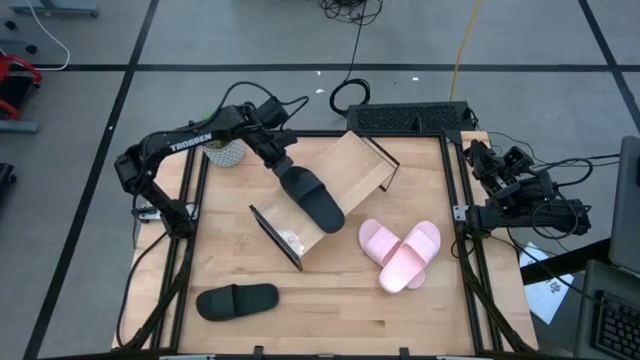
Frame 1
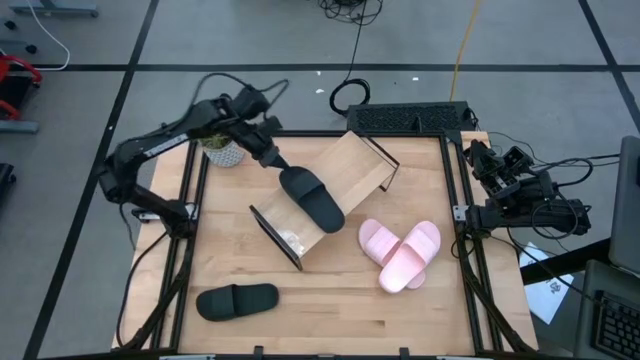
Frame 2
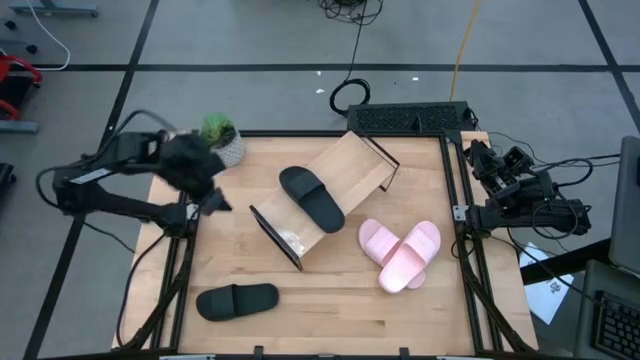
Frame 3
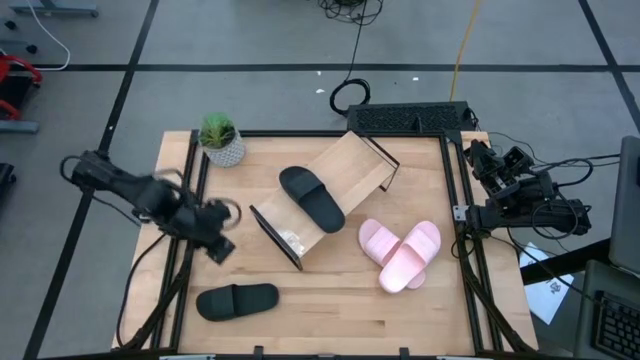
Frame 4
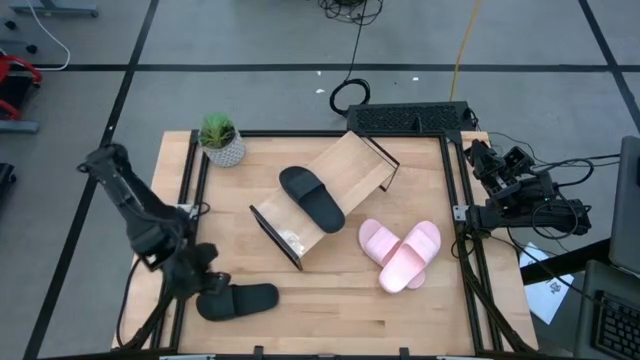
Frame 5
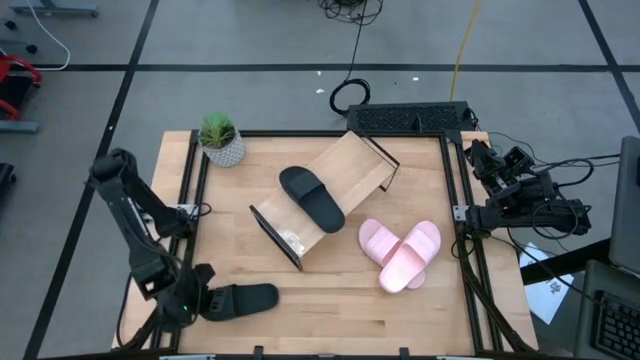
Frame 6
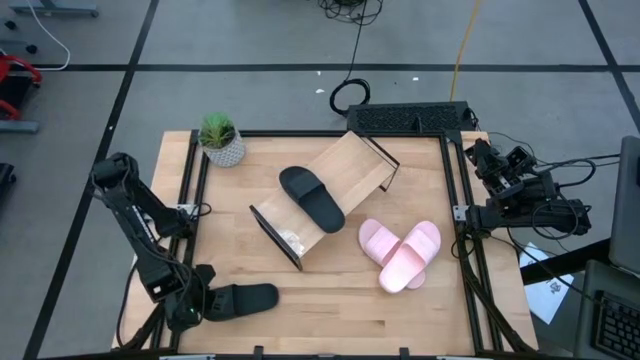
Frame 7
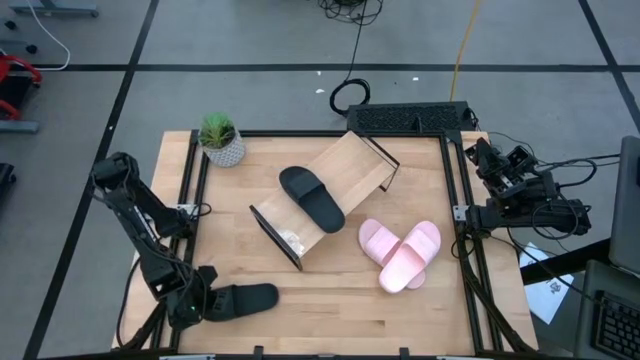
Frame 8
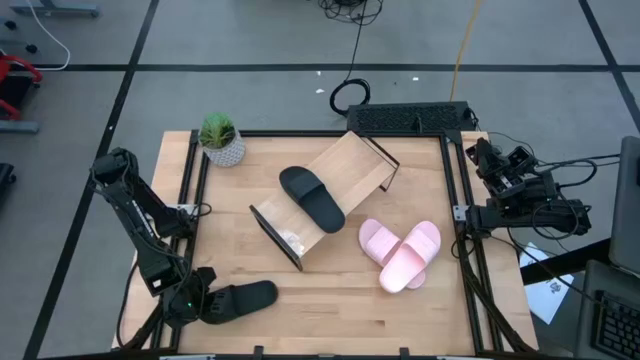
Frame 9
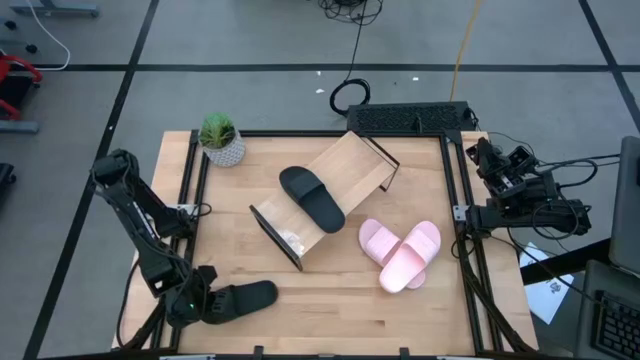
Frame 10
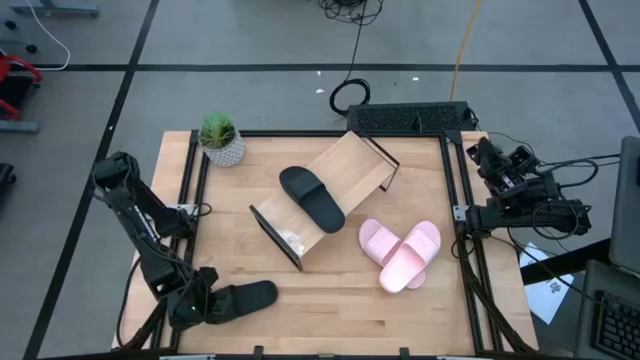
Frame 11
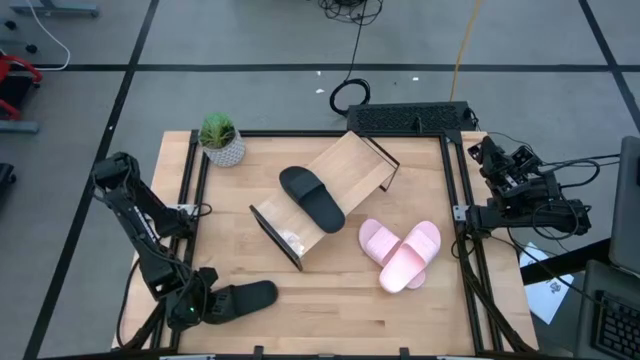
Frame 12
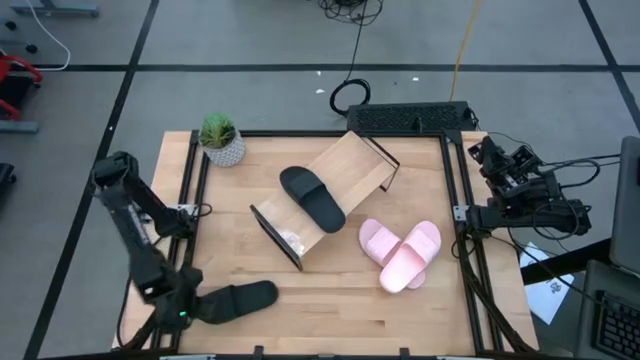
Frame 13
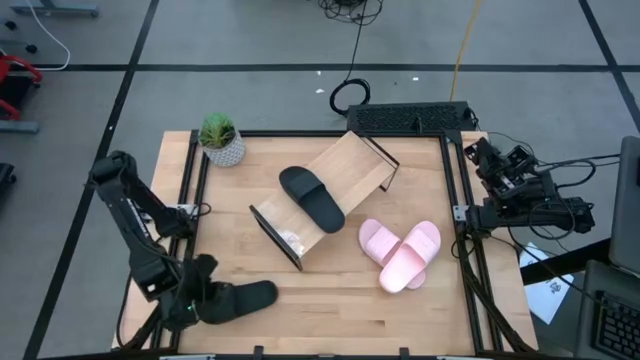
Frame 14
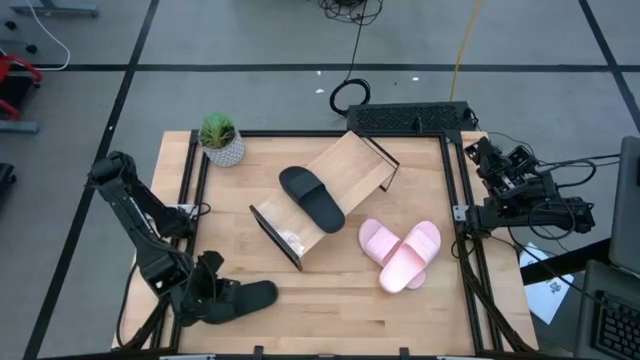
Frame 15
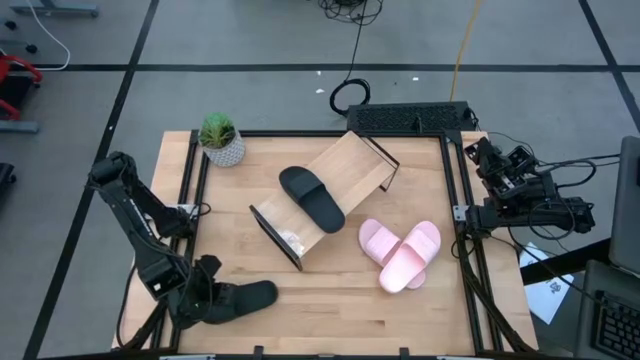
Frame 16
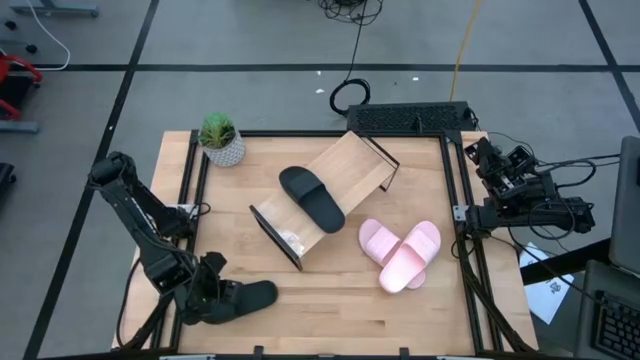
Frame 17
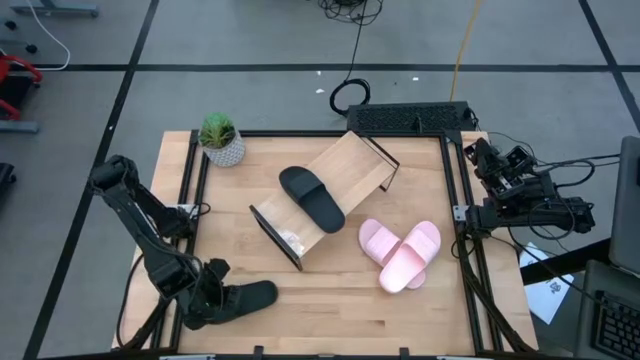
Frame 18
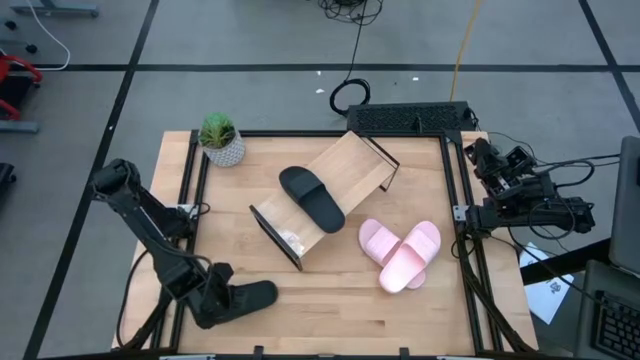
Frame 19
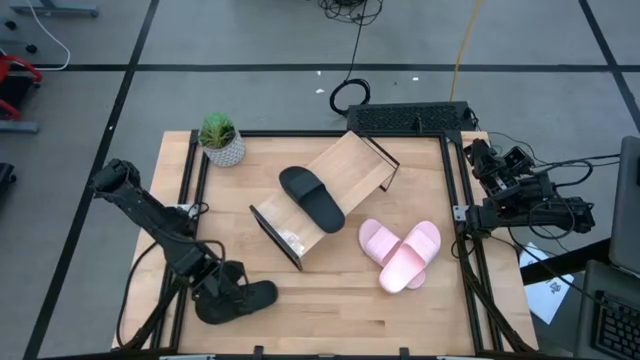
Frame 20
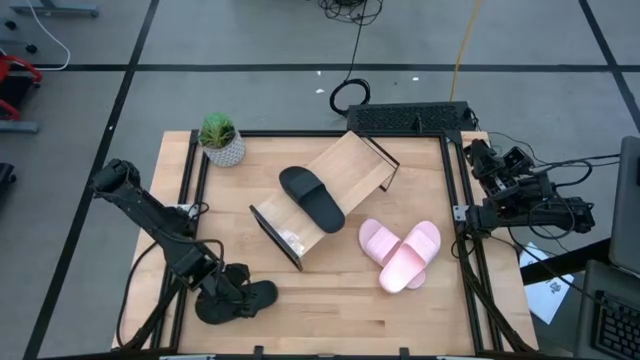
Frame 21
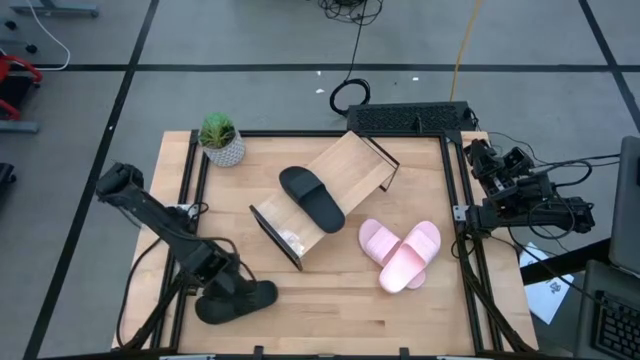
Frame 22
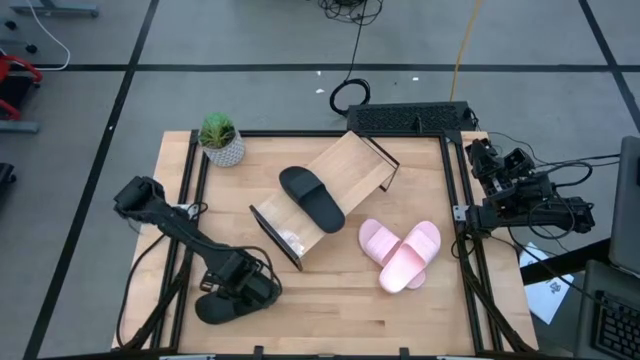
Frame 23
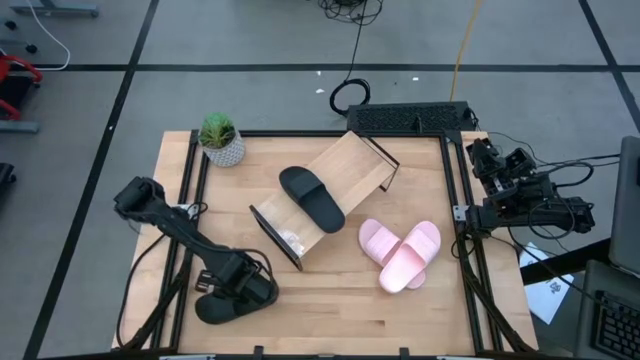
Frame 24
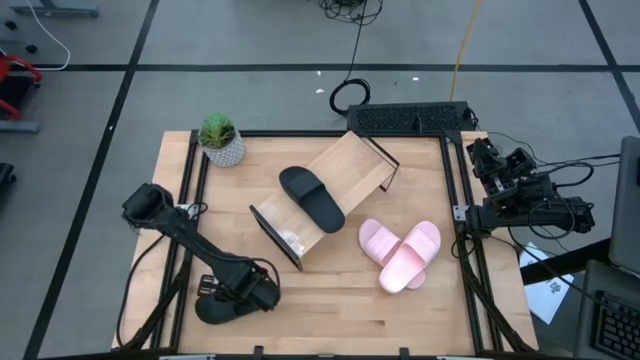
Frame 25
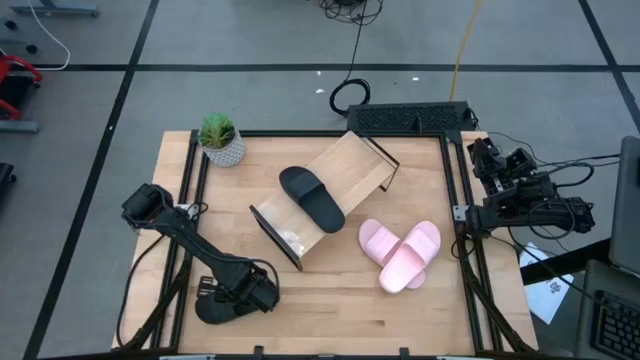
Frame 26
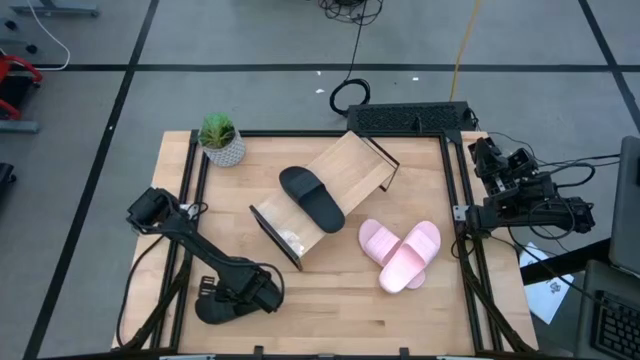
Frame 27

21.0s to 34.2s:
Task: Pick and place slides into the shelf
Put the black slide on the shelf

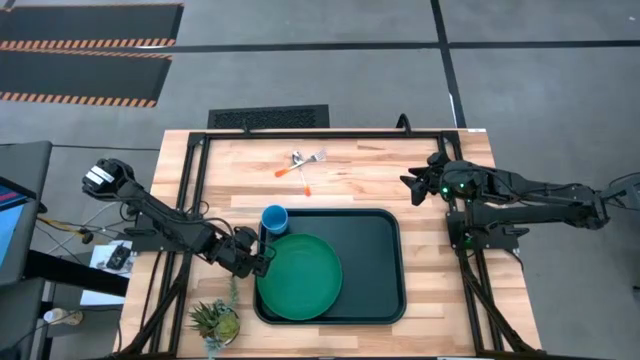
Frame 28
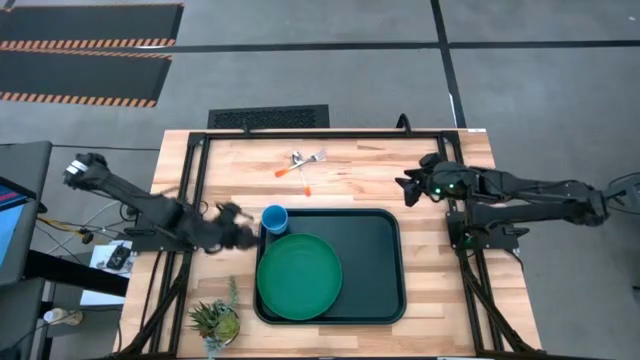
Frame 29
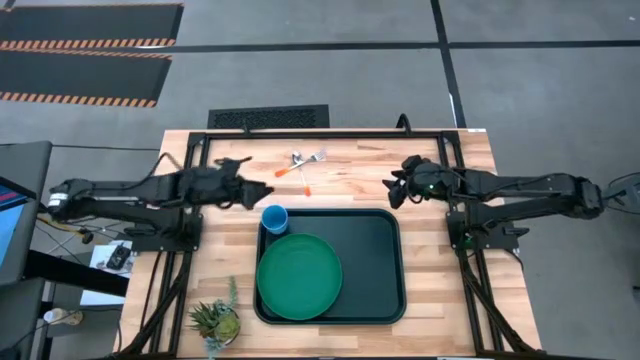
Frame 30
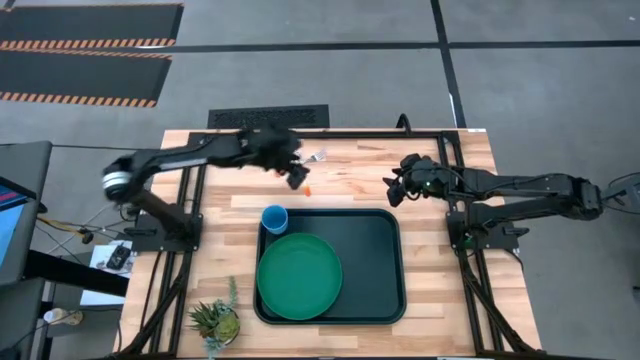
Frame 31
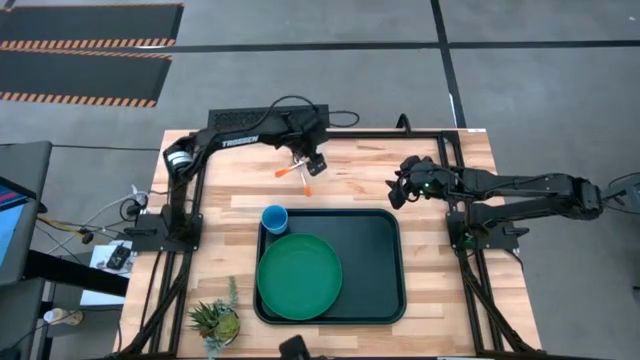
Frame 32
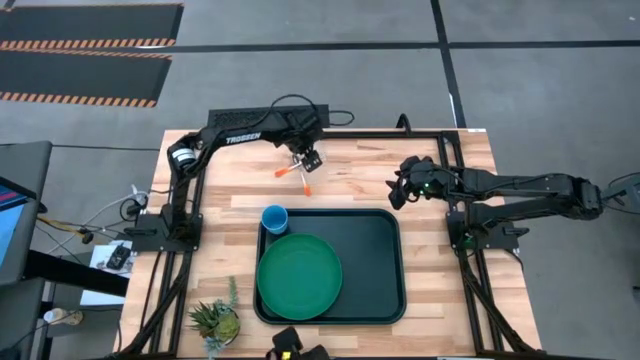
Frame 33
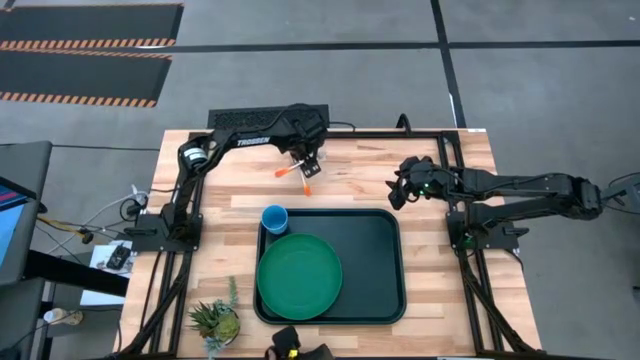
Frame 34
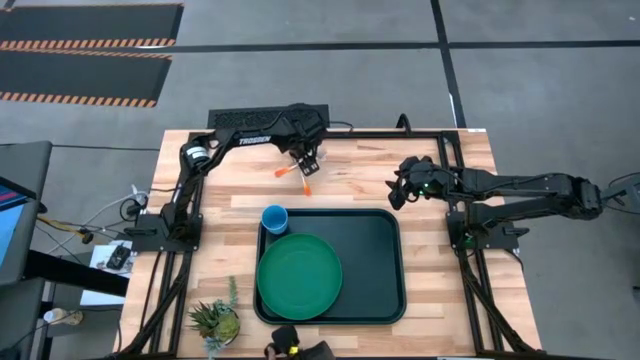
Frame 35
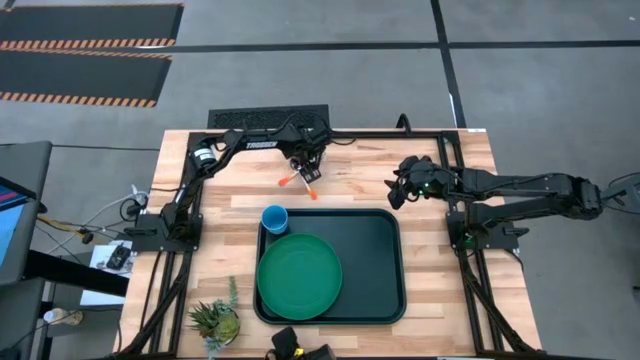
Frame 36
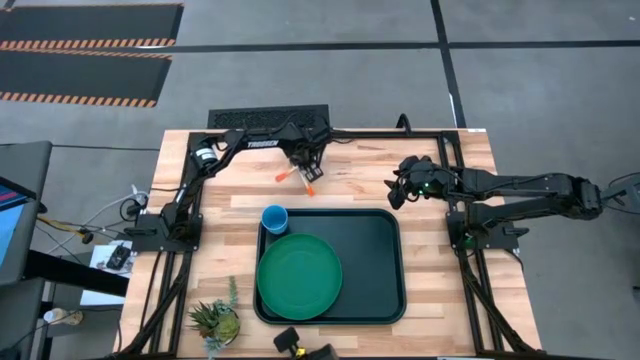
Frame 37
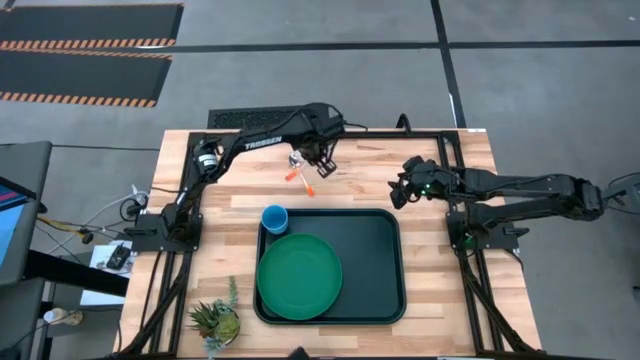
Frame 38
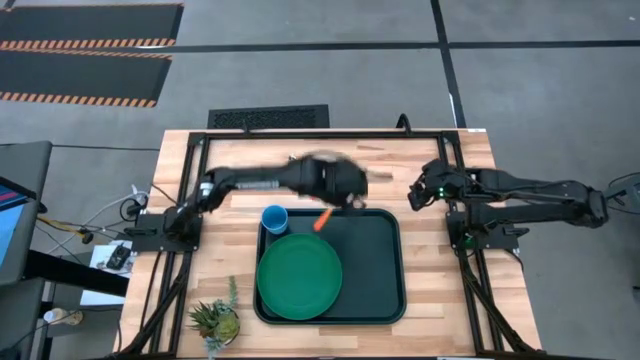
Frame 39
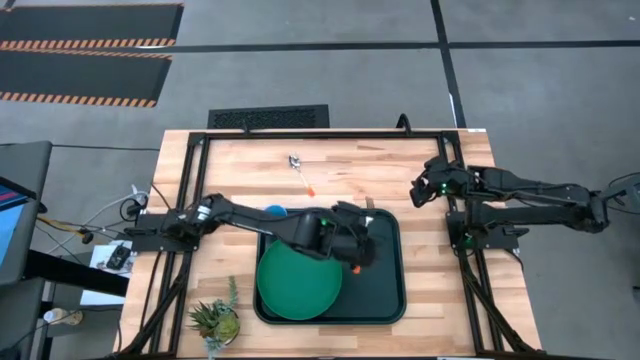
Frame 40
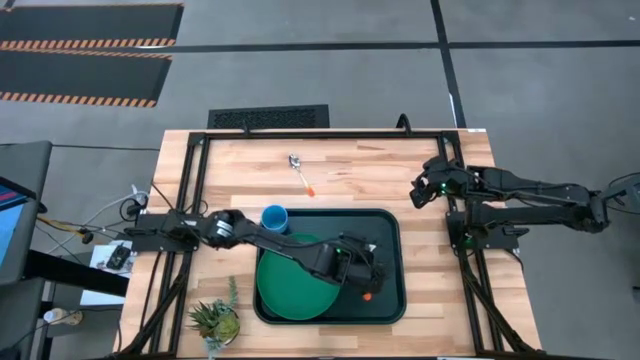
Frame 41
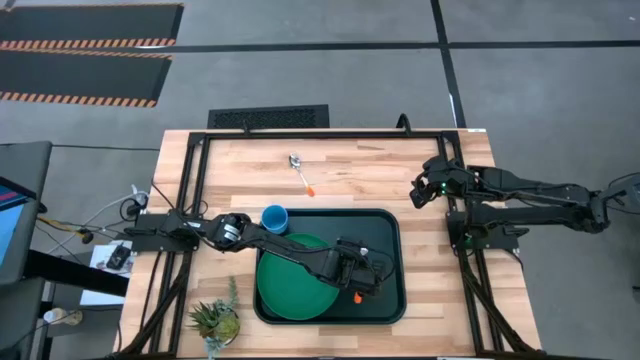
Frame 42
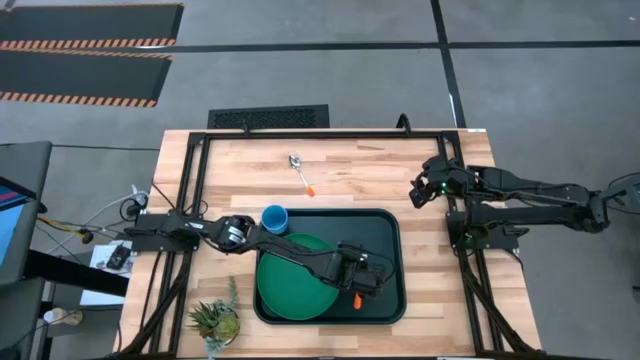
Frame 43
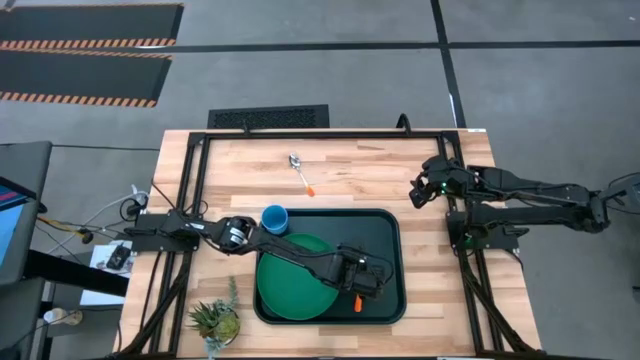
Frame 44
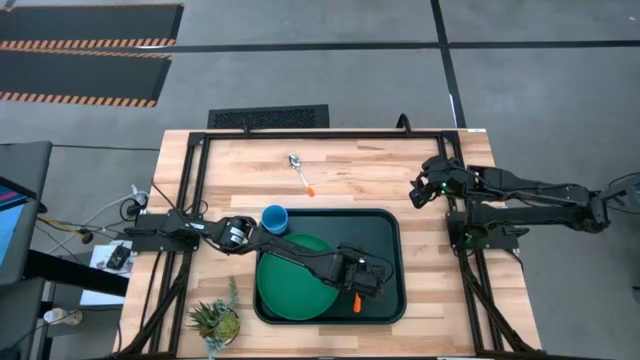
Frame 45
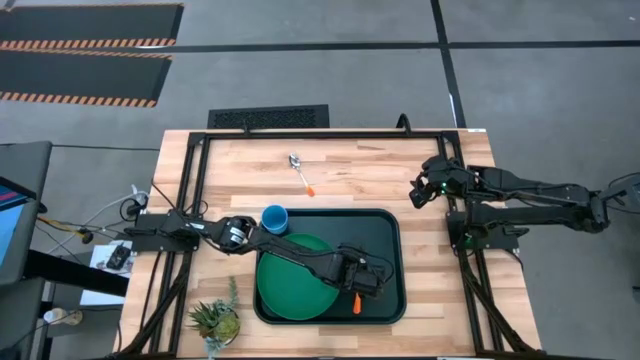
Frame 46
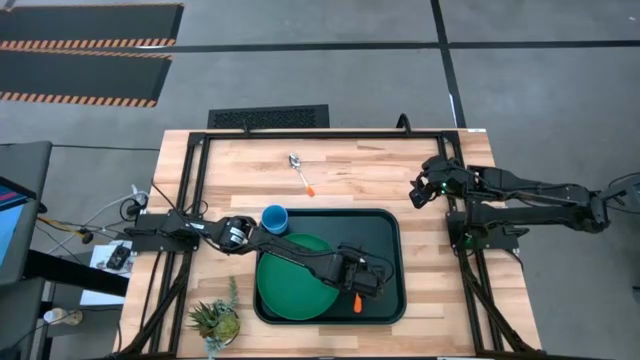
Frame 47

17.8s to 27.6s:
Task: Pick and place plate/cup/fork/spoon on tray
Put the orange fork on the black tray to the right of the green plate
